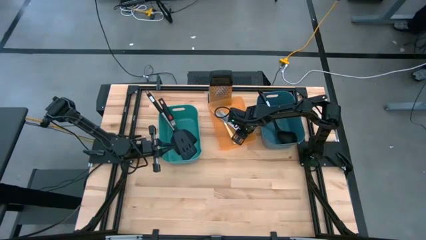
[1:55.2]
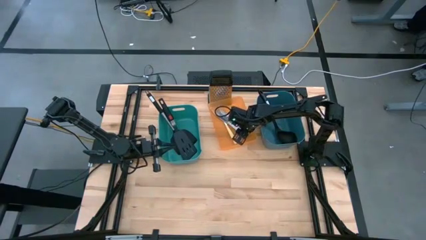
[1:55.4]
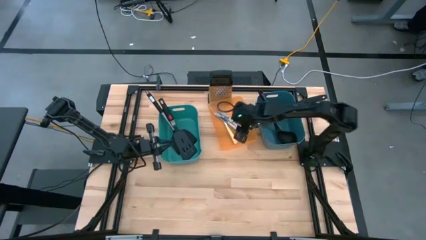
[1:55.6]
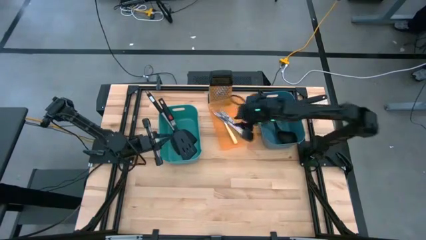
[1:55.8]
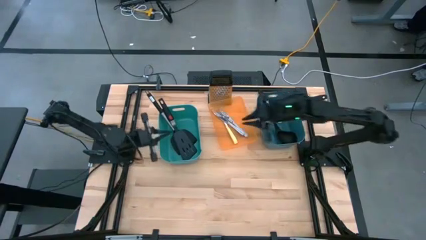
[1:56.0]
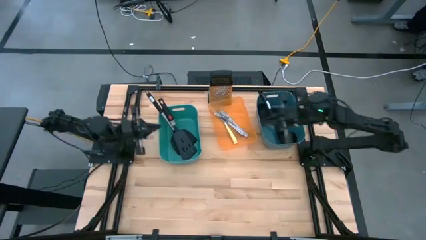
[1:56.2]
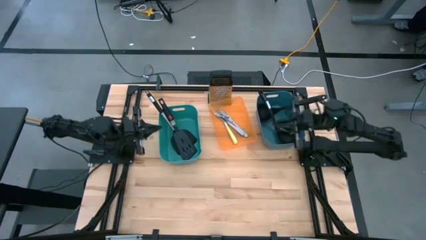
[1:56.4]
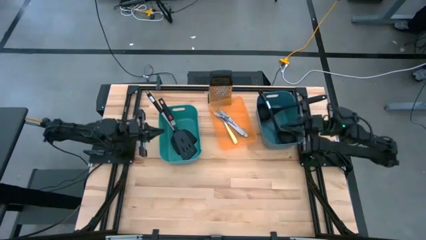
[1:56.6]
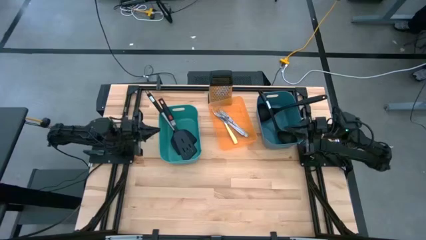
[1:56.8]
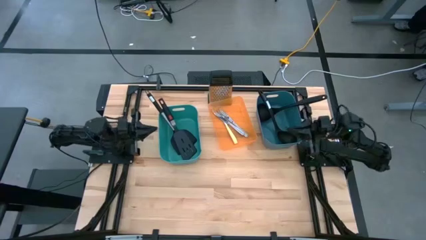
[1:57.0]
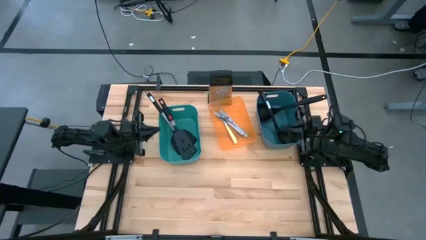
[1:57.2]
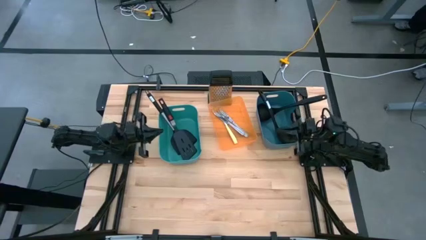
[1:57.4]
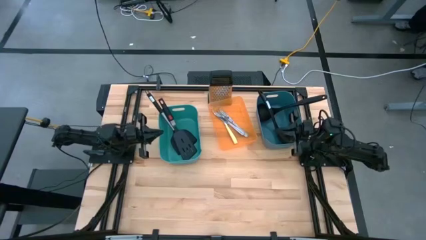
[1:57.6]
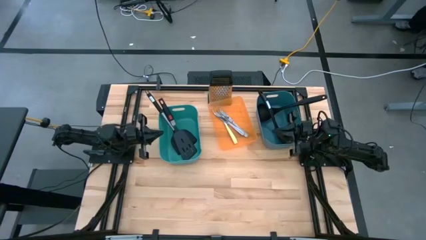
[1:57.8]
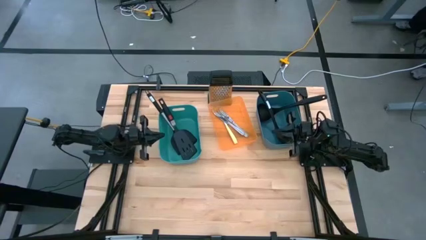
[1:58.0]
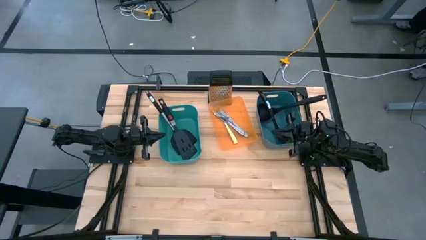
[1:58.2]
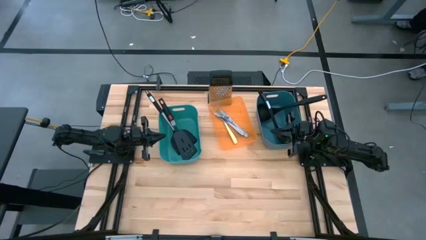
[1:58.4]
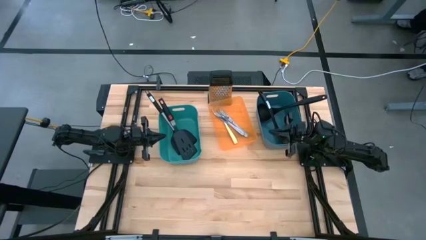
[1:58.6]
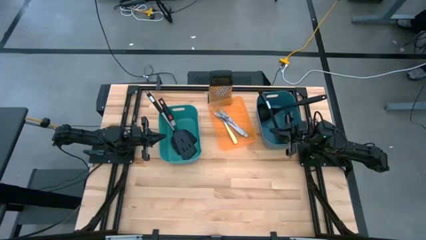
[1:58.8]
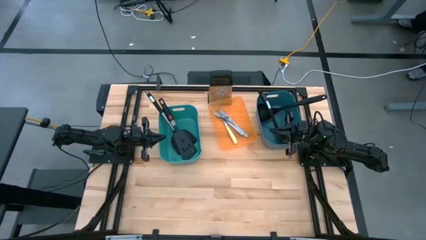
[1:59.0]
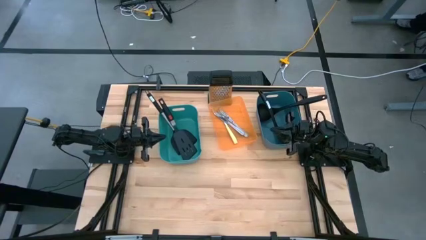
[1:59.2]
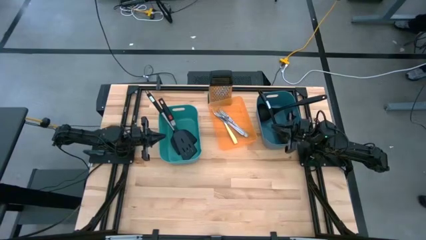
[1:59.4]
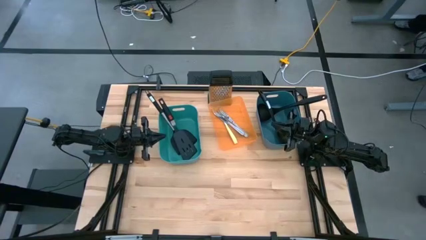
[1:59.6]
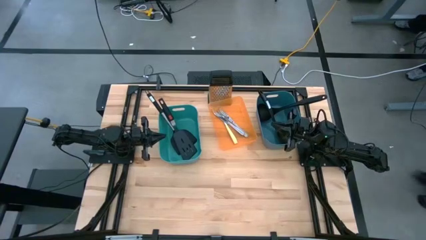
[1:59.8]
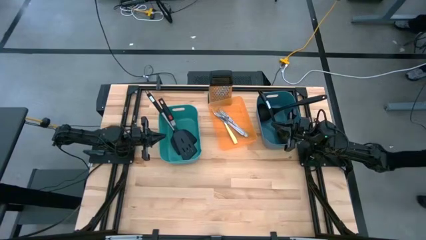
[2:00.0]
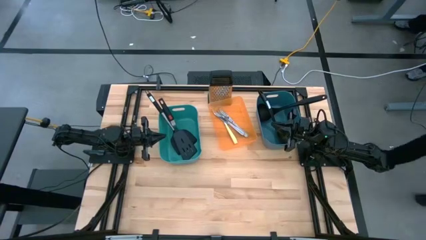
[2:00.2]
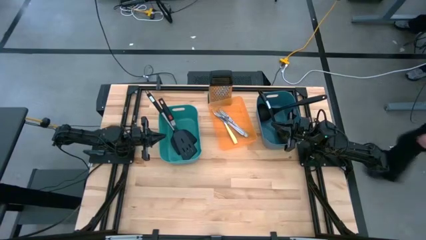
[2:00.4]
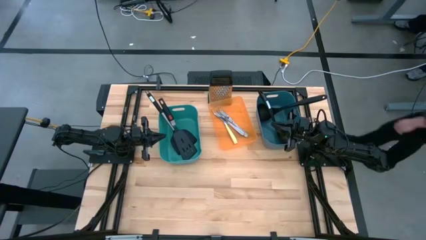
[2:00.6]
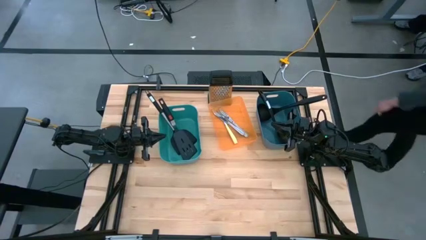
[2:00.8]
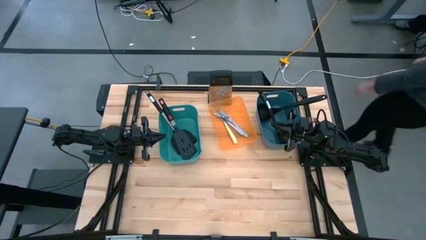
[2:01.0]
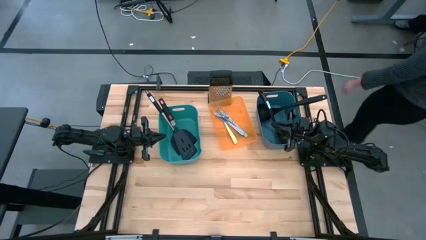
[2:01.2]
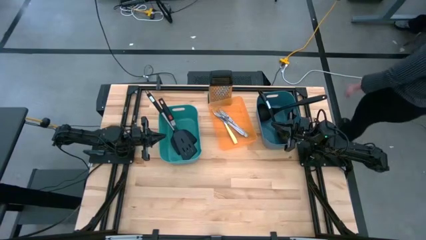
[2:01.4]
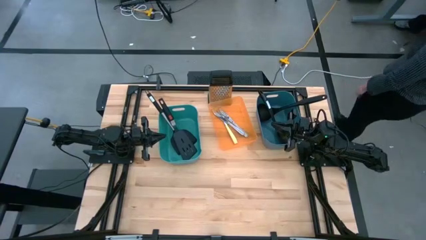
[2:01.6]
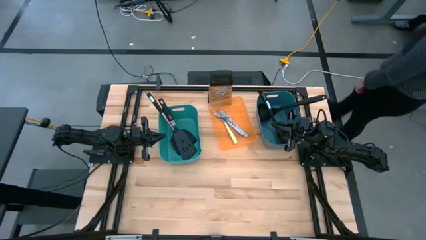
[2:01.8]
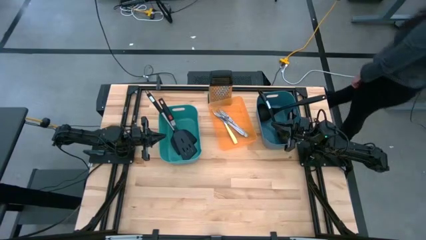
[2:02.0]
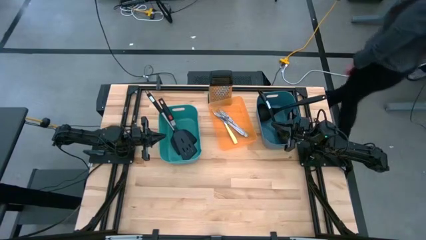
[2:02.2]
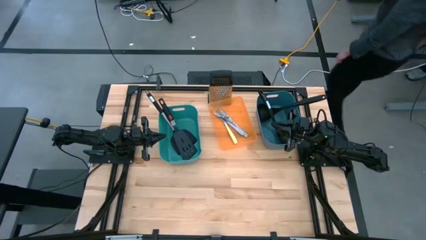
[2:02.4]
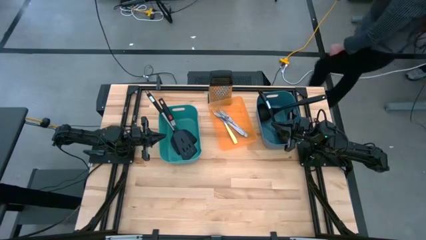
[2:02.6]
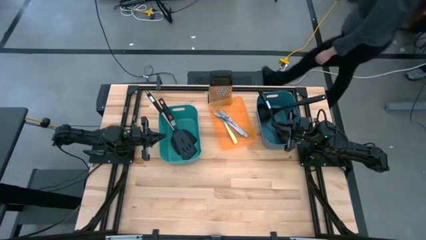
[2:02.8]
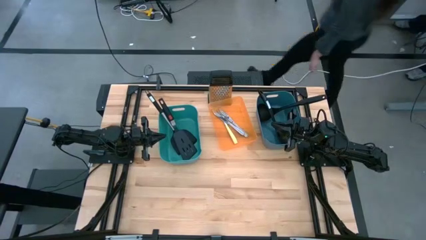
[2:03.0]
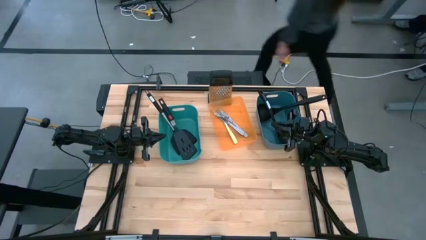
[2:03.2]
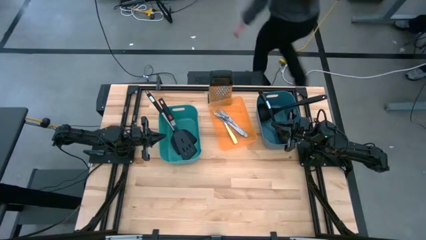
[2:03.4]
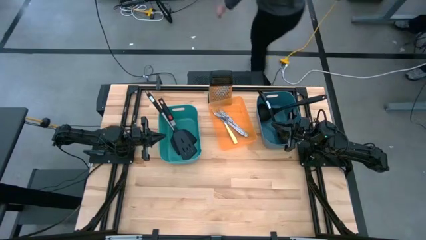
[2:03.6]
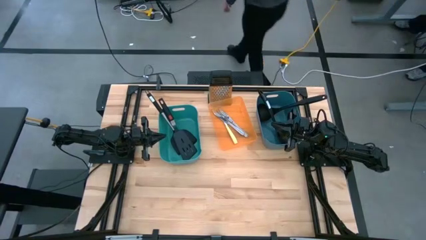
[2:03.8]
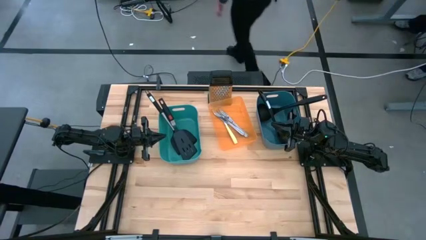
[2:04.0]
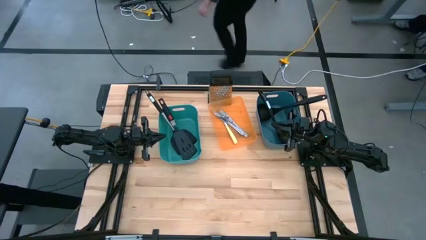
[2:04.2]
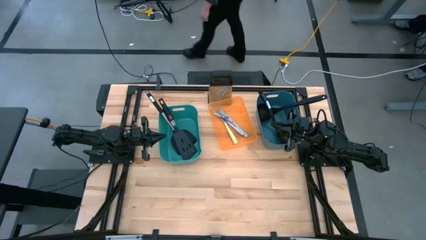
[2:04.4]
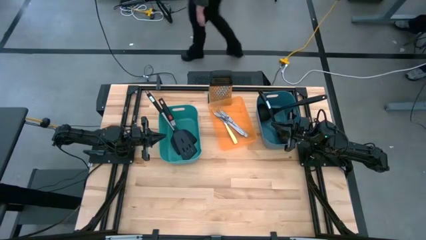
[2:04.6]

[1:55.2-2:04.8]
Task: Pick & Place Kitchen Items
Return to Home Position

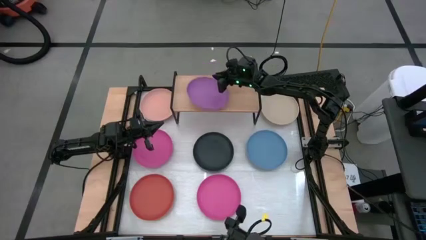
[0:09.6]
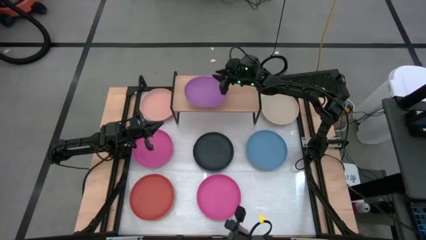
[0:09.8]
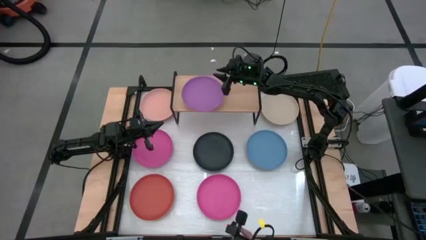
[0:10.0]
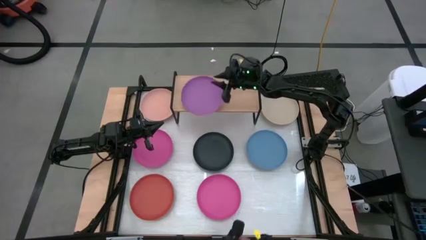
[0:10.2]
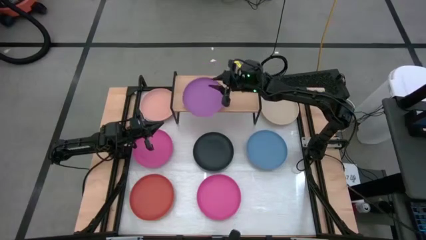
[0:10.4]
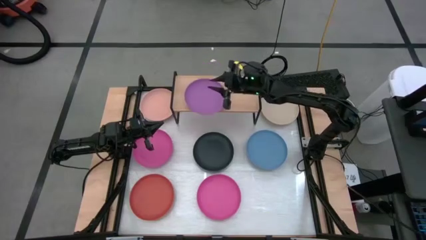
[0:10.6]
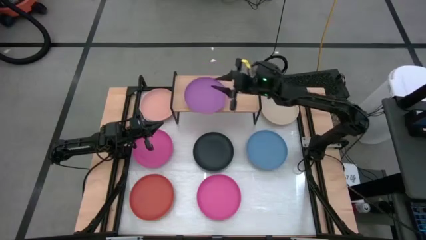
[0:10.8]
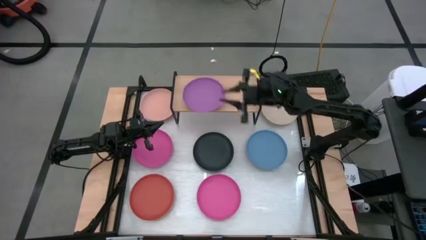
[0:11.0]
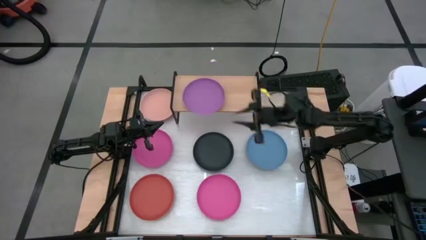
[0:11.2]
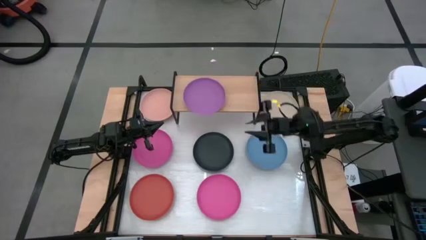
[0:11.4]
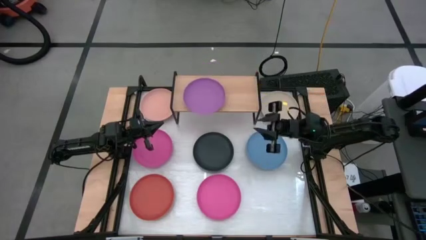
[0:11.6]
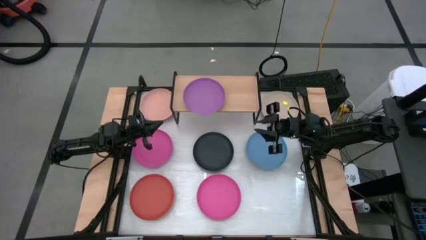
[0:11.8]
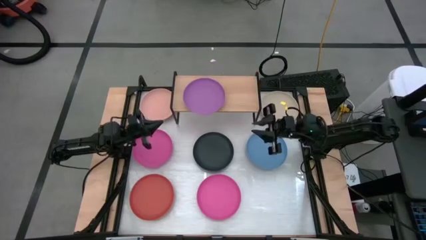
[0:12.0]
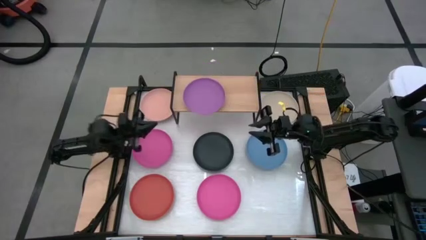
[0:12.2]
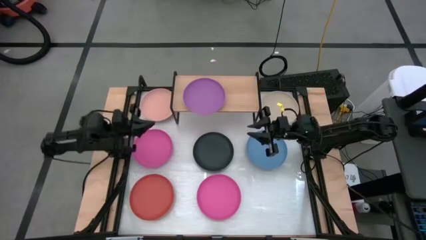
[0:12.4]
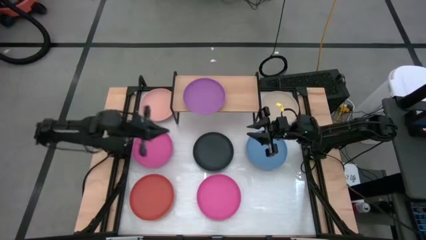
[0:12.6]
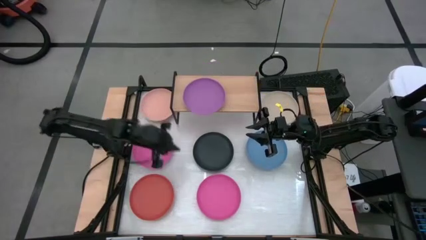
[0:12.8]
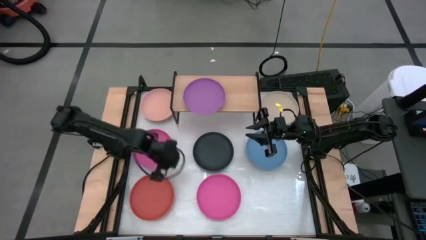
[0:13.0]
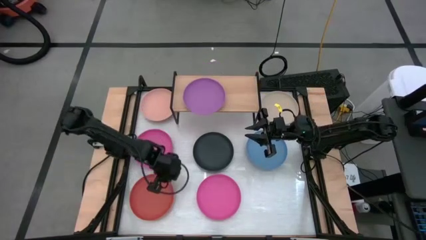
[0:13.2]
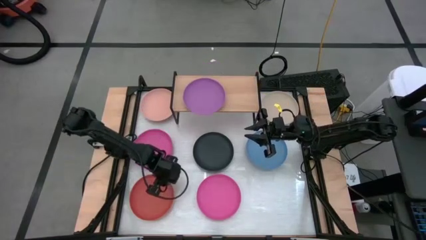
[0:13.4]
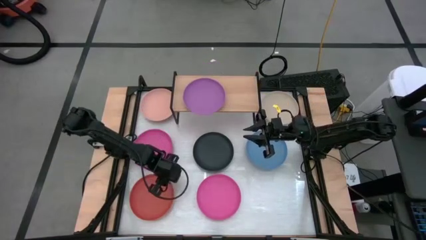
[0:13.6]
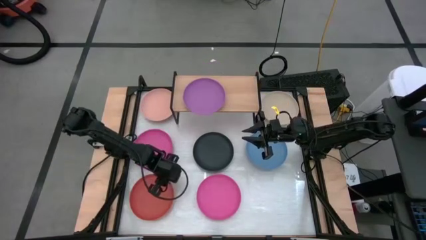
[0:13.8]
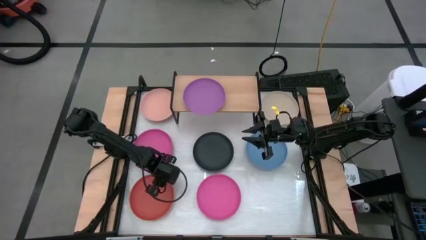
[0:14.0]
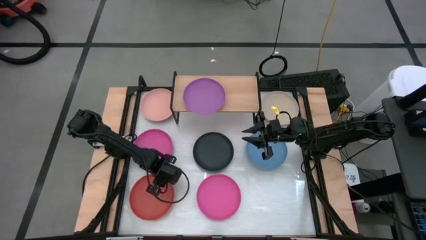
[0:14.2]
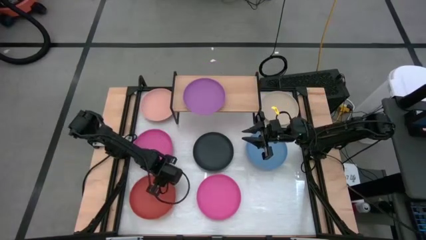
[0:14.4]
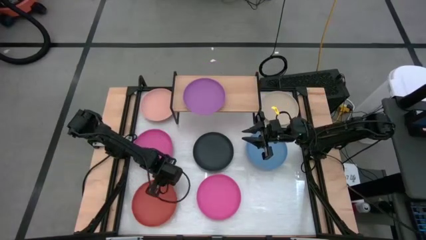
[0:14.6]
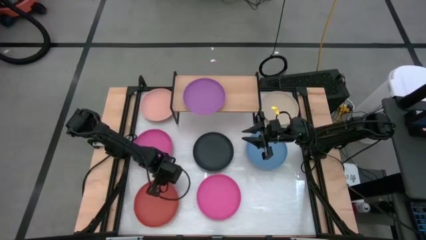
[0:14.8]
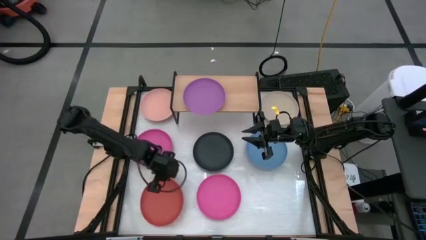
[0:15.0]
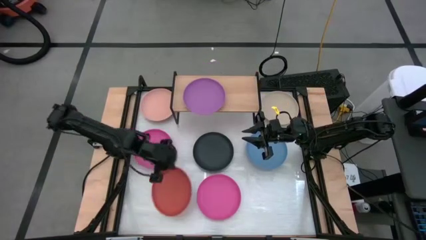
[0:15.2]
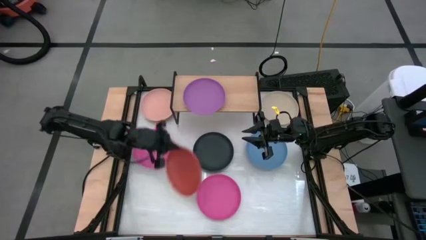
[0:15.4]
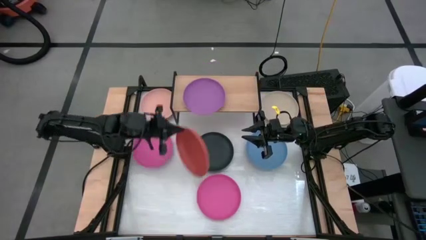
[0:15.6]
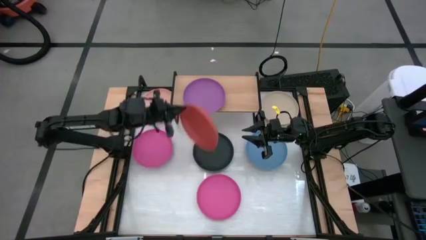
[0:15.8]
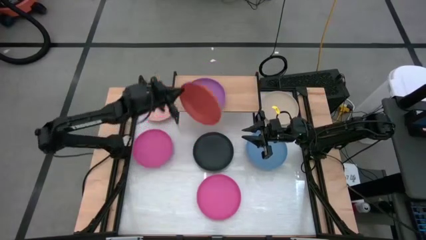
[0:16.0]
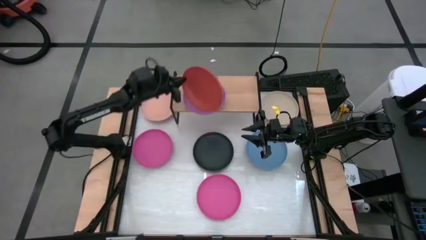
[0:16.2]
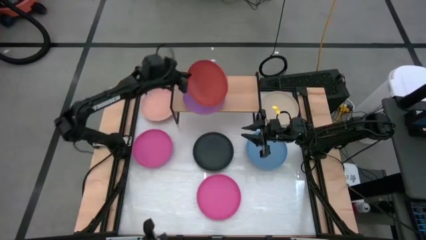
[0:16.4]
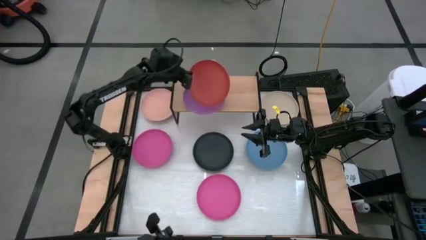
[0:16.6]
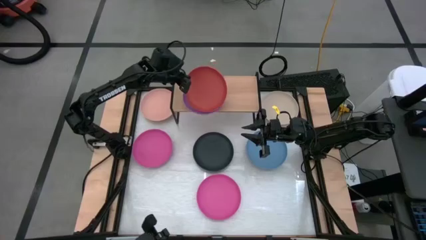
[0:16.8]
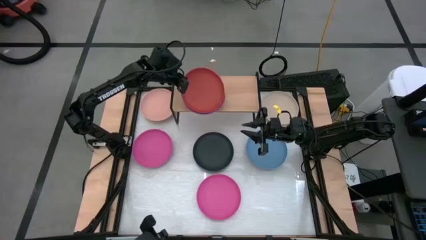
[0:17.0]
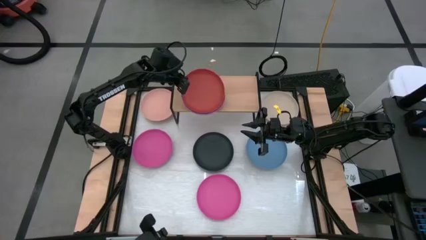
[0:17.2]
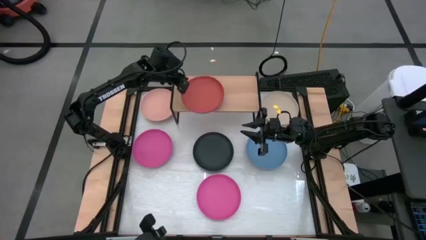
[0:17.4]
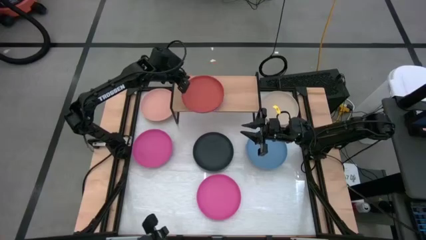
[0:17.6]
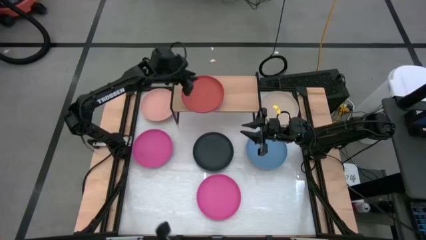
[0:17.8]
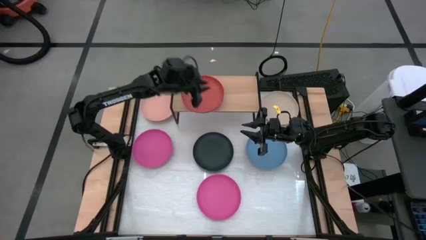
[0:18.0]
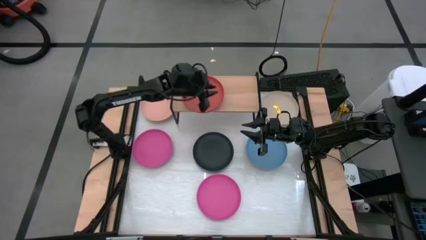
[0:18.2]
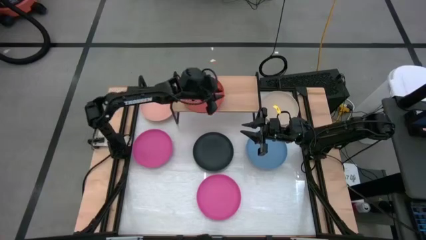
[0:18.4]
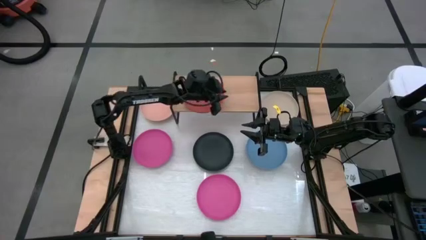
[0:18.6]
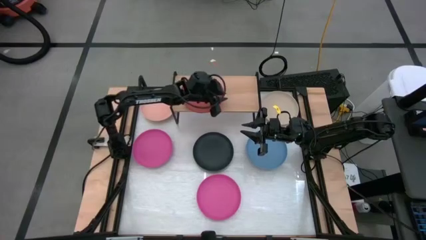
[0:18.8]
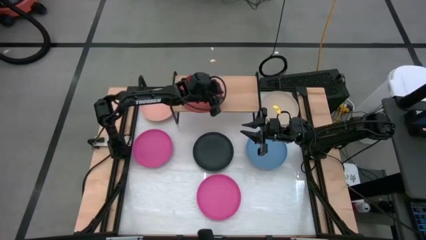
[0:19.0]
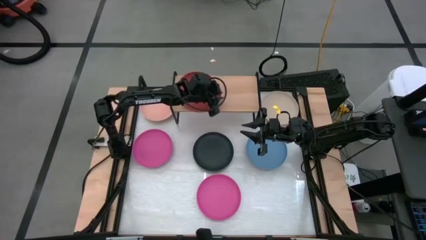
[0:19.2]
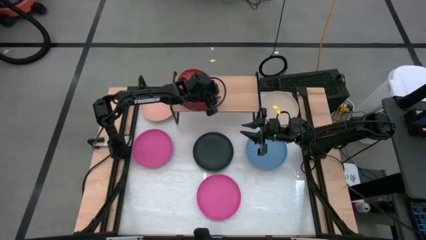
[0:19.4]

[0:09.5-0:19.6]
Task: Place and stack plates onto a shelf
Stack the orange plate on top of the violet plate on the shelf
